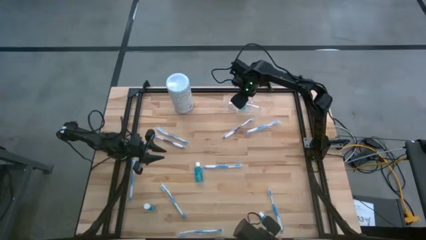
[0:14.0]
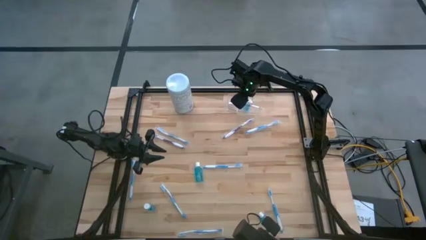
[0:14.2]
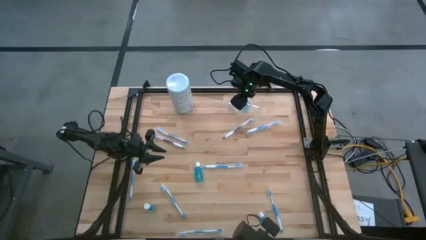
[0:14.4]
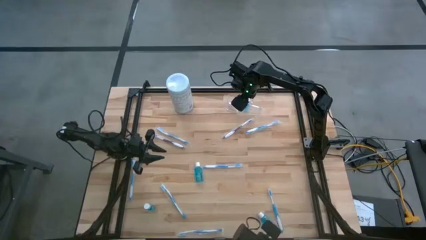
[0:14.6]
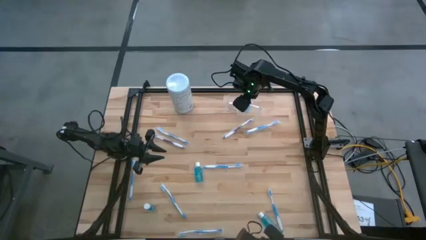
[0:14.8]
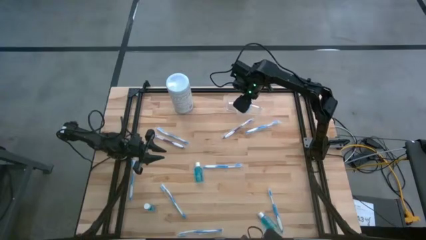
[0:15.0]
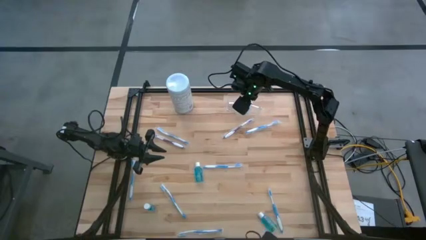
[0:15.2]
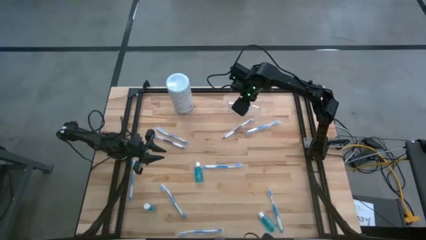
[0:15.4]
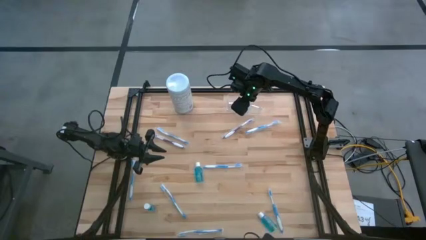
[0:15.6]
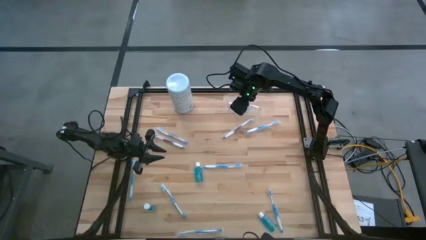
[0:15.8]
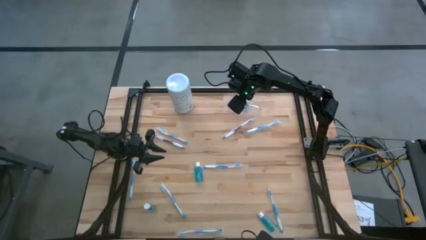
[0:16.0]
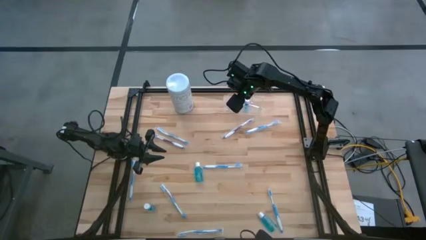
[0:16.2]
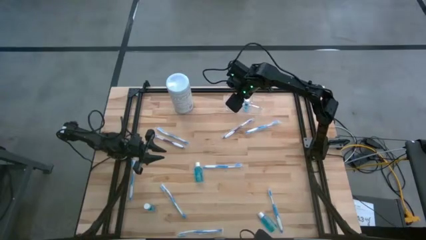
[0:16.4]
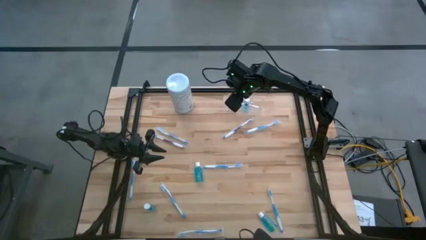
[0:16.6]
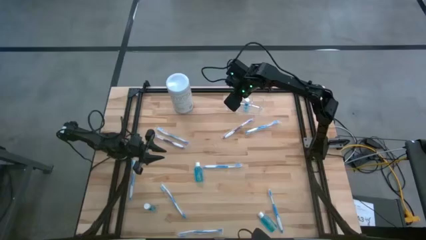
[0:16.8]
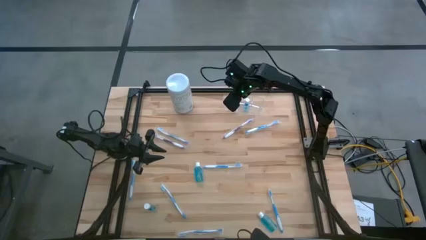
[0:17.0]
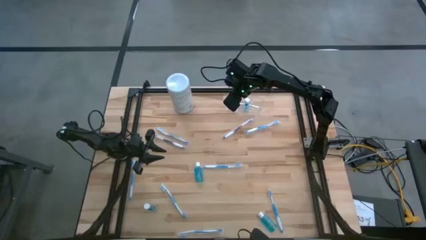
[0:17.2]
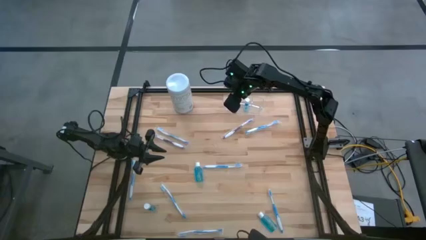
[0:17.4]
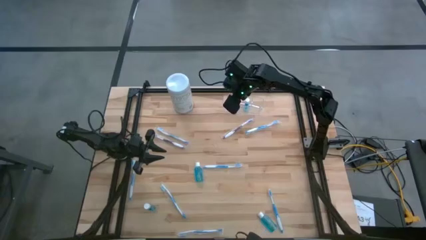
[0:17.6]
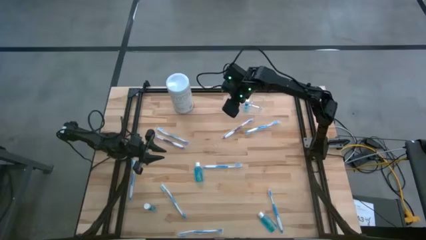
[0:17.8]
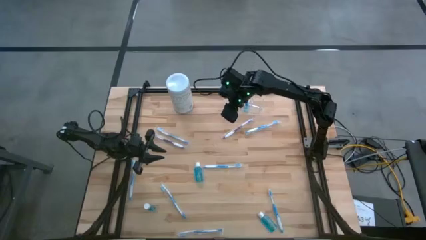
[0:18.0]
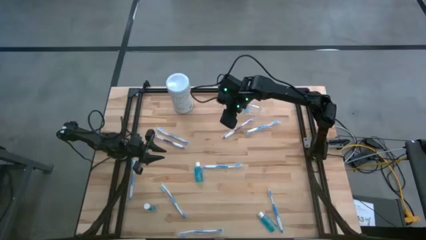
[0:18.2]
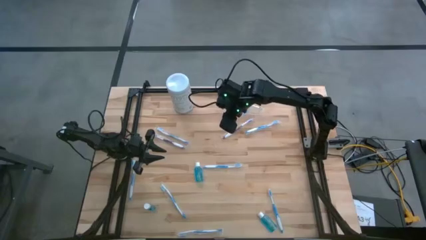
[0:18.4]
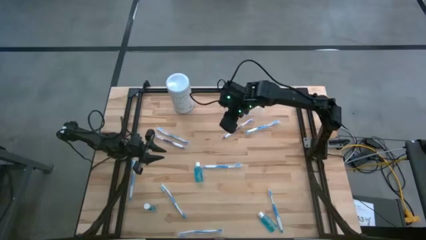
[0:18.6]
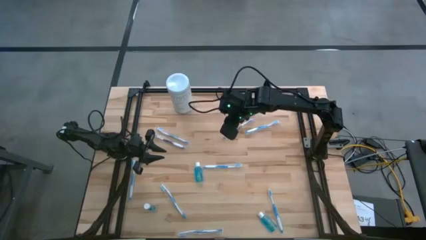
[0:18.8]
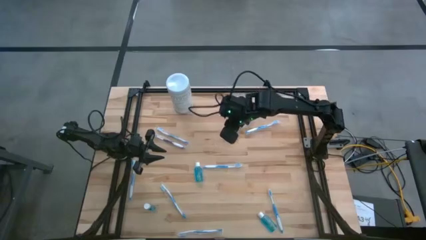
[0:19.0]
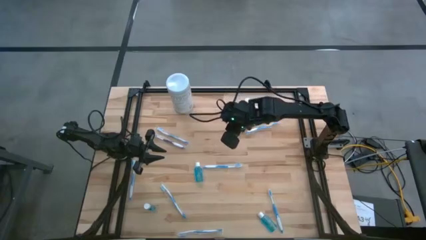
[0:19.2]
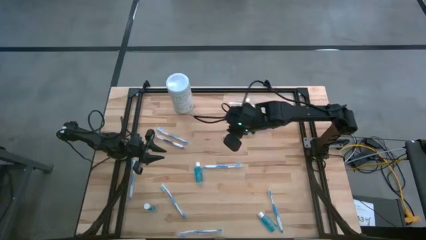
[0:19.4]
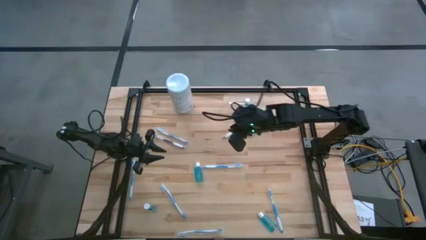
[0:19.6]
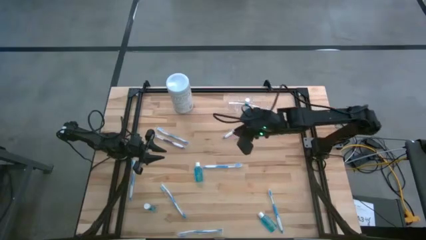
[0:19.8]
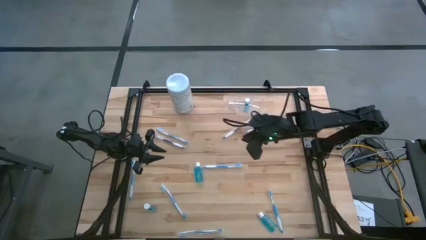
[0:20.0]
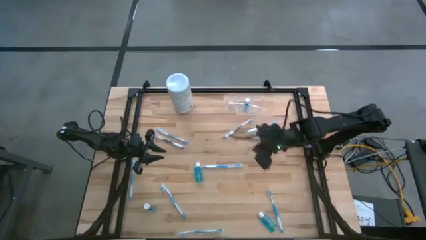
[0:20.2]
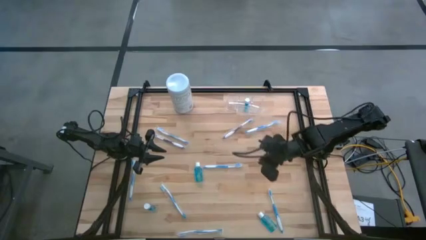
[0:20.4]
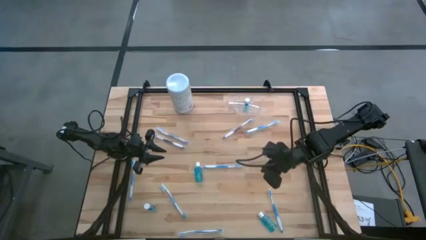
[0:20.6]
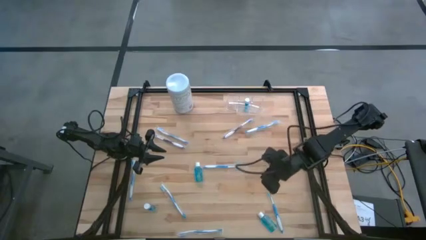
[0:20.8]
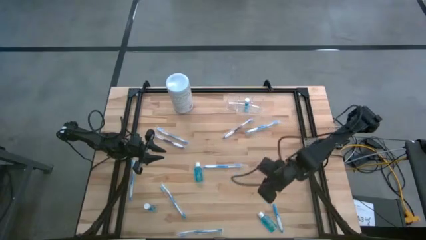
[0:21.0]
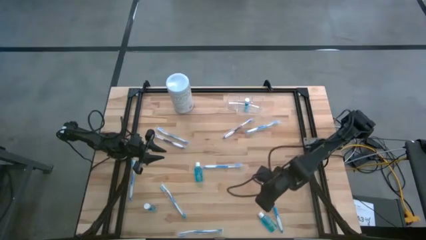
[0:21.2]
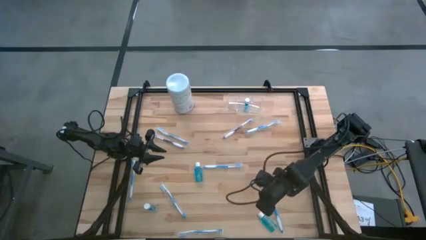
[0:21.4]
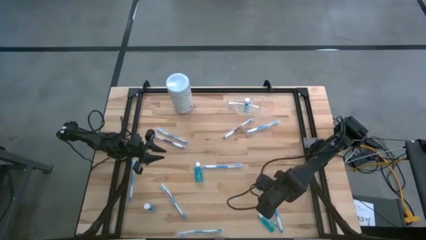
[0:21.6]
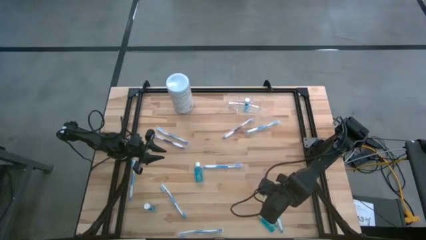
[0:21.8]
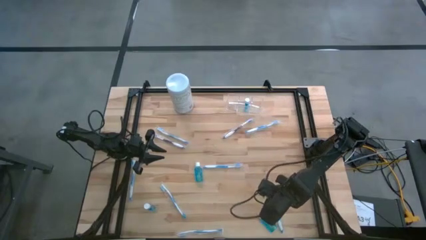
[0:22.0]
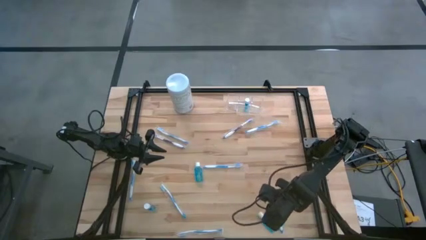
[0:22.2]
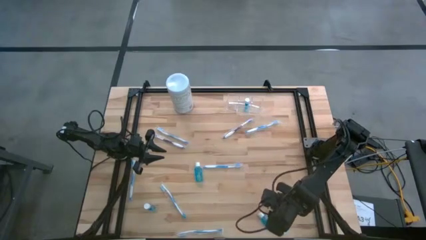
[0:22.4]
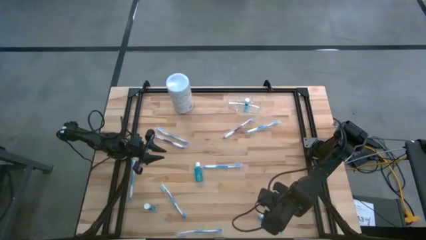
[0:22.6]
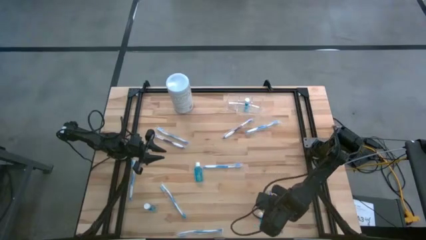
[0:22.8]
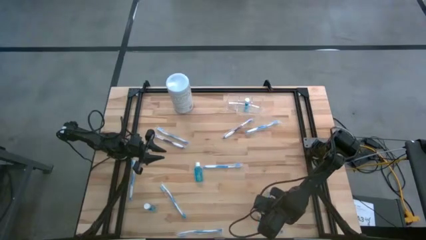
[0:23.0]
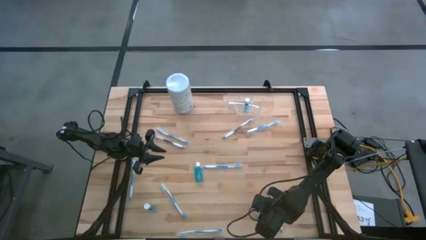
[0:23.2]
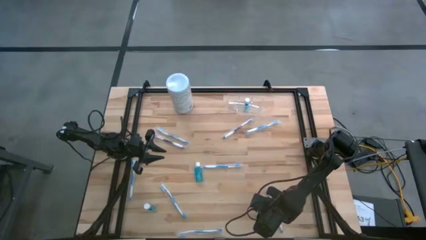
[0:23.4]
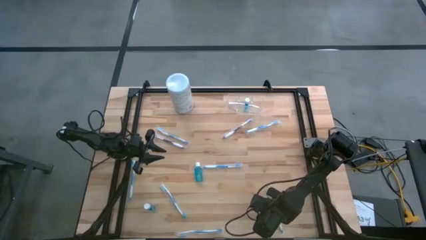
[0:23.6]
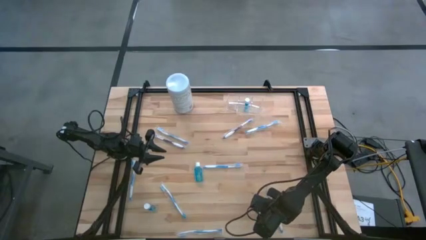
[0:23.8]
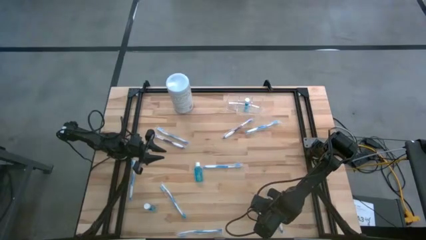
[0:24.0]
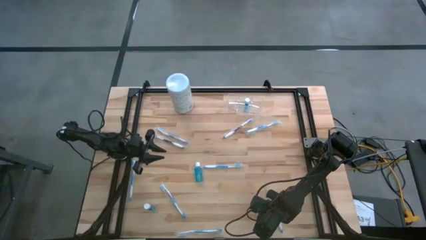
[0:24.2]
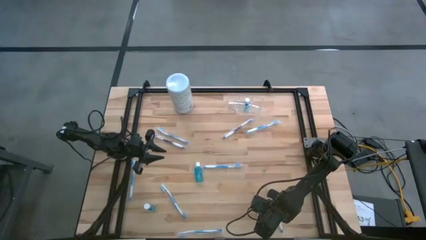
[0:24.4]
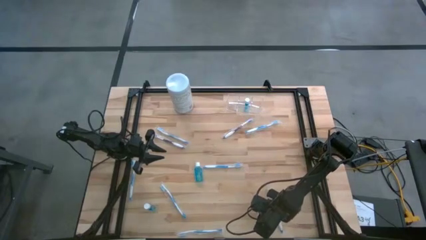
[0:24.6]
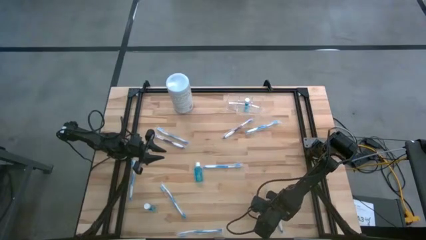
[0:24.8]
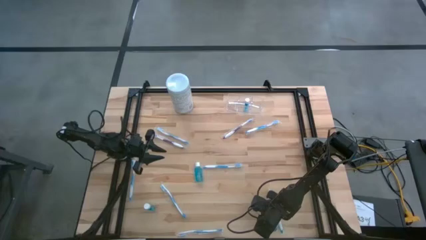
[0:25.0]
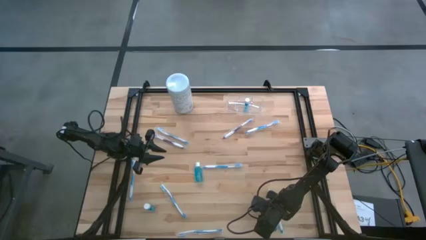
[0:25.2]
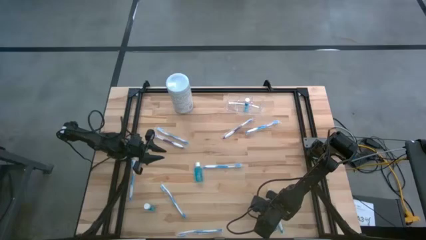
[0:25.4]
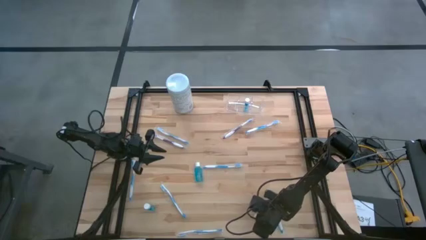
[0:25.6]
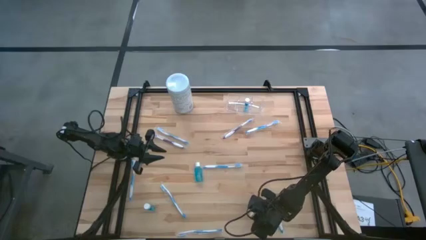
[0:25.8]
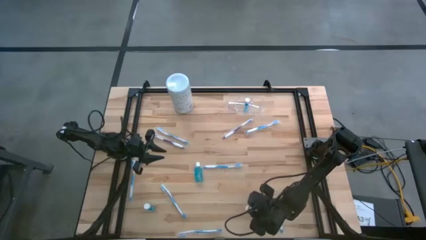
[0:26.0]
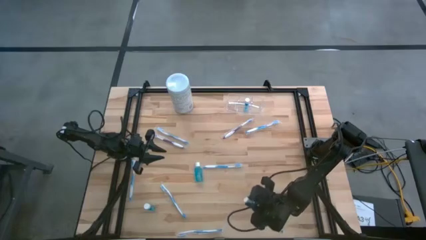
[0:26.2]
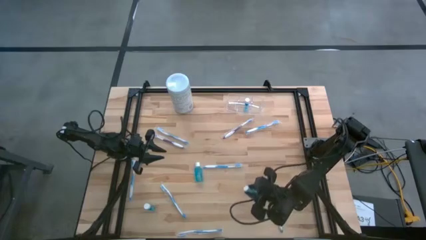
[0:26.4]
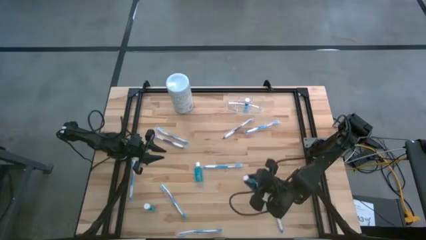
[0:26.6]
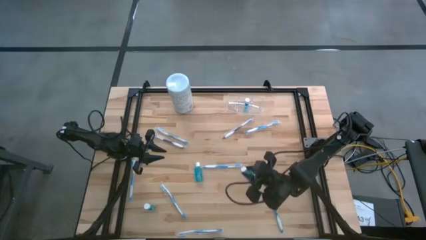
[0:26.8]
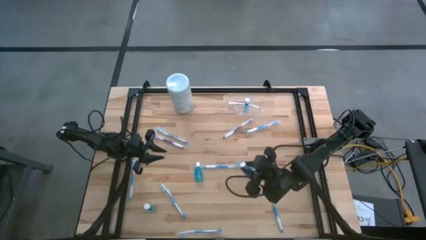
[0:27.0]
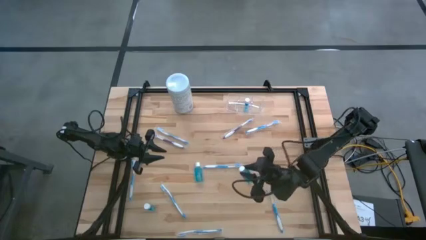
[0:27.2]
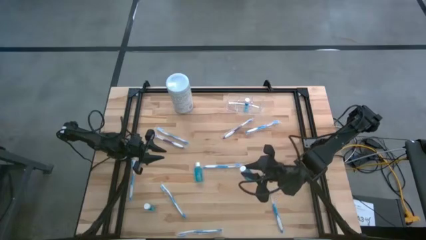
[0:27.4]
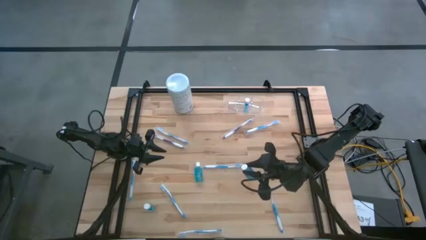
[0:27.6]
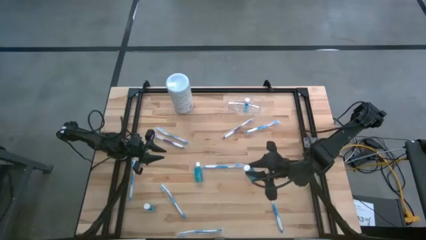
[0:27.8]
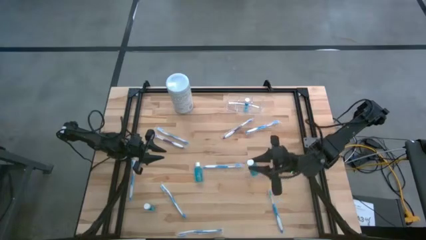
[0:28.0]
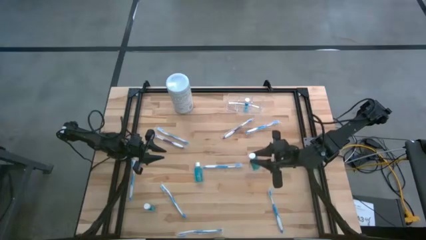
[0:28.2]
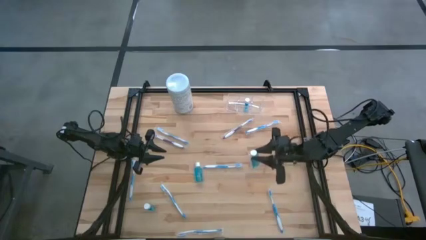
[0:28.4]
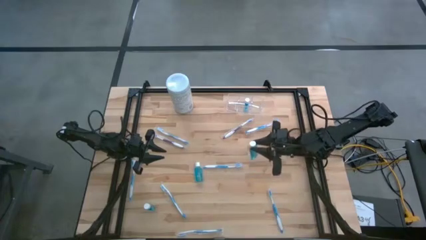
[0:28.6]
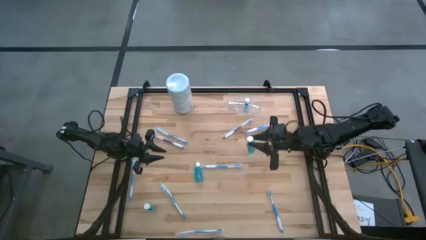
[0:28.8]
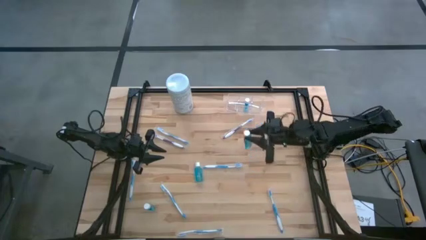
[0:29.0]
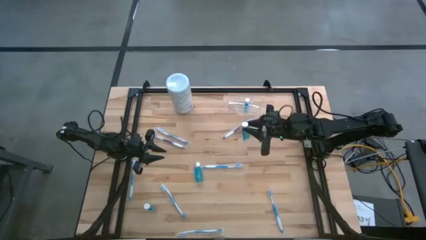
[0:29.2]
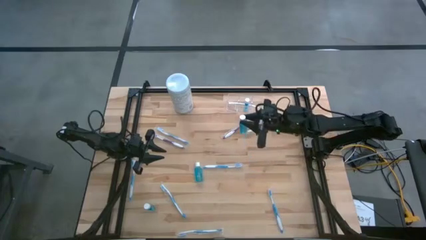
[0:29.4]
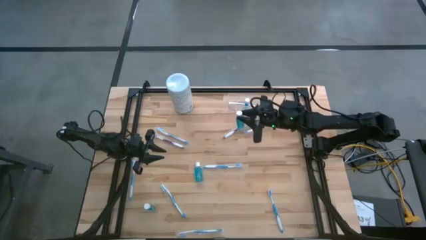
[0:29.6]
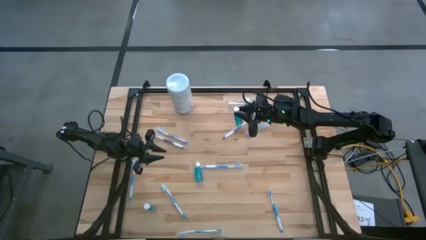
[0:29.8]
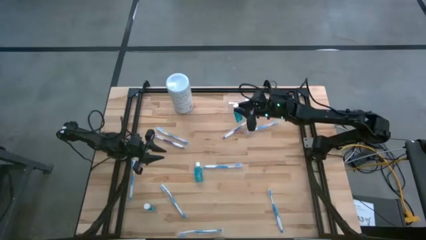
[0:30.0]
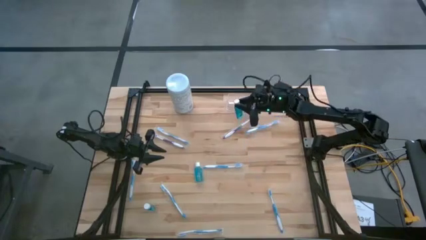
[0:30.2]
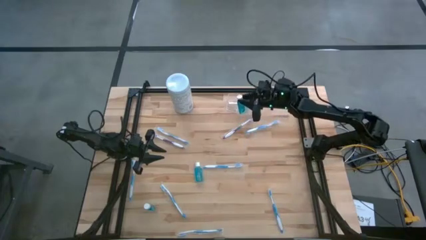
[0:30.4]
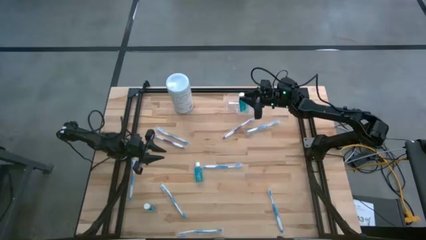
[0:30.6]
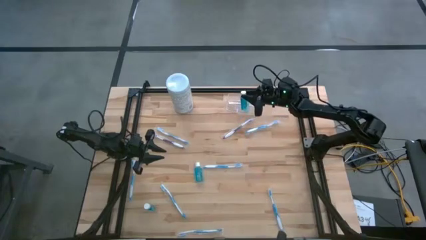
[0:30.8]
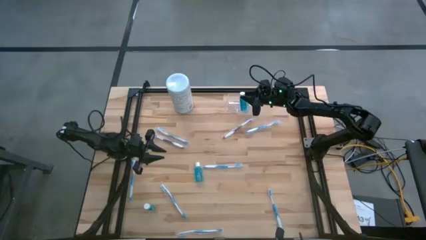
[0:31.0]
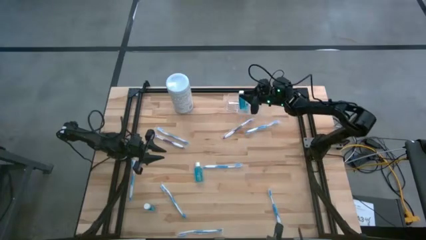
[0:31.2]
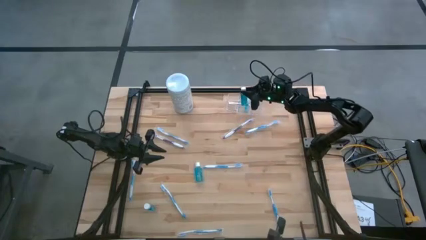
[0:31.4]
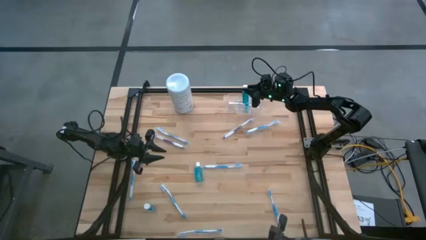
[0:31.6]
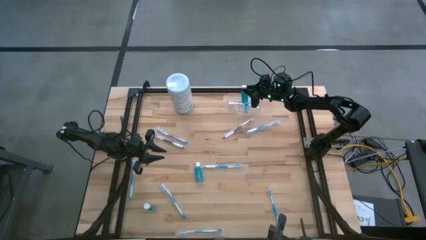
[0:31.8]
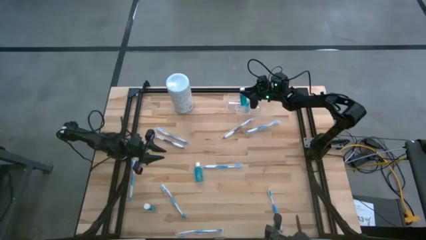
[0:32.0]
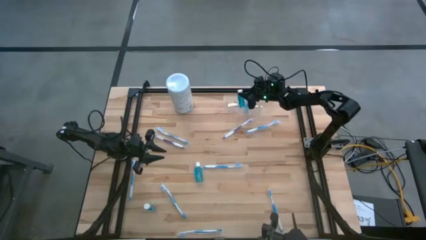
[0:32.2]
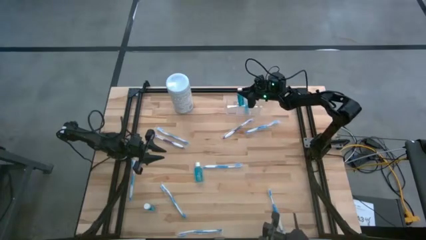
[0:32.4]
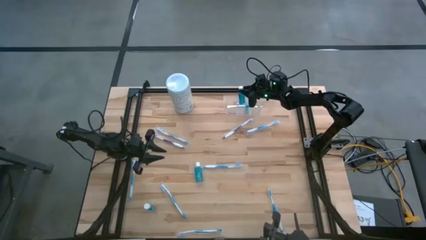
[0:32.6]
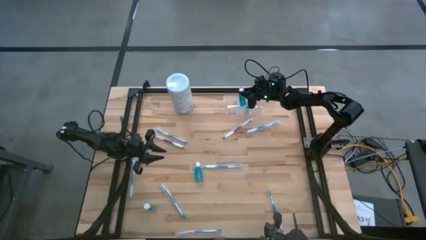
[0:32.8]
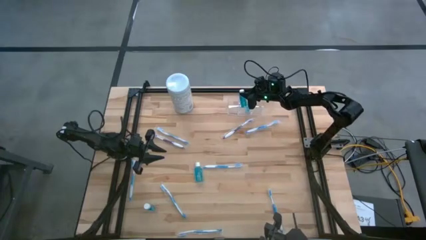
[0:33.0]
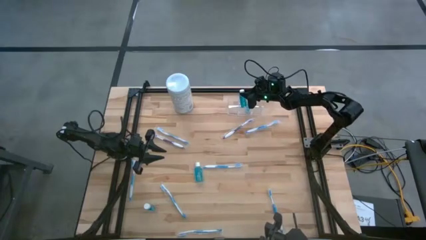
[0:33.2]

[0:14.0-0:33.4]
Task: Pick & Place toothbrushing station
Put the blue mouthwash into the middle of the transparent organizer
